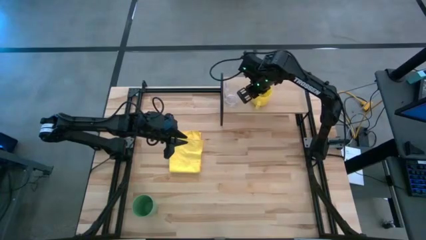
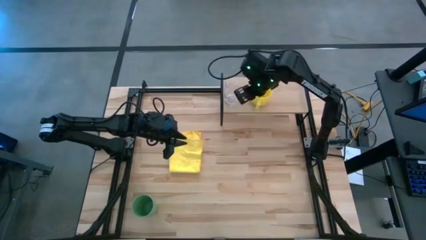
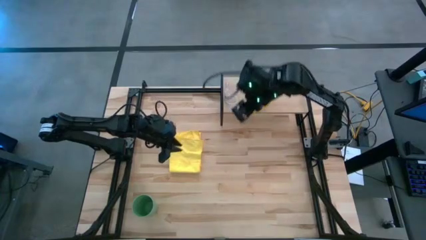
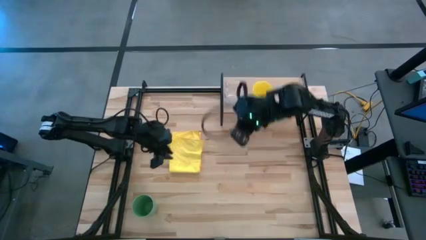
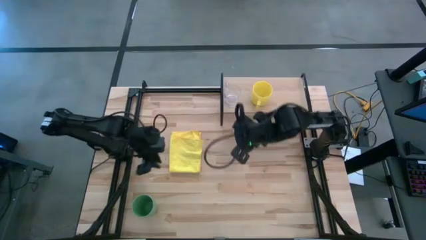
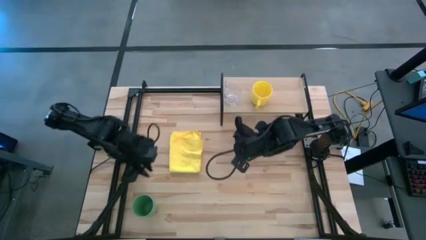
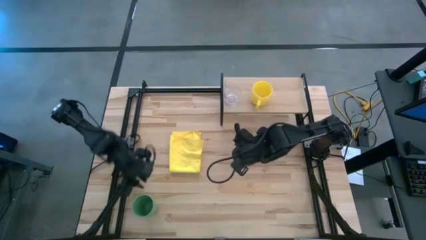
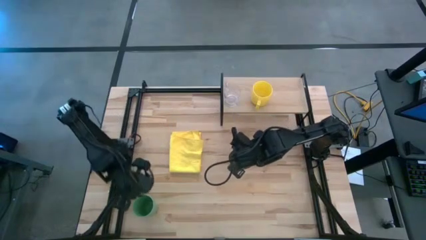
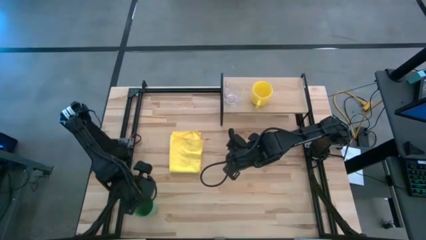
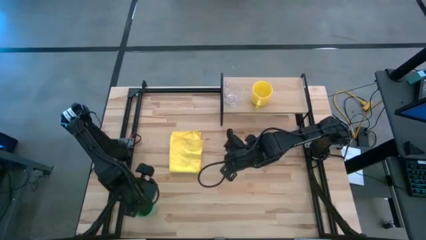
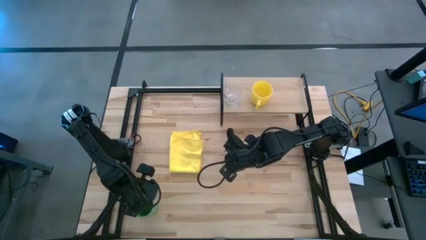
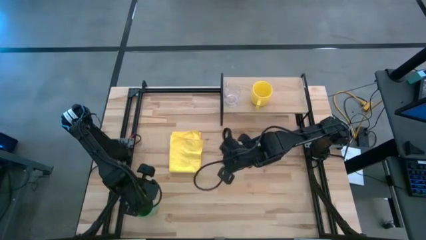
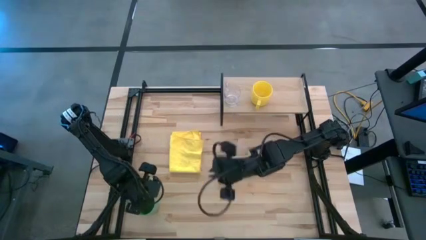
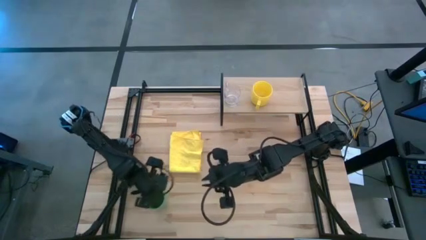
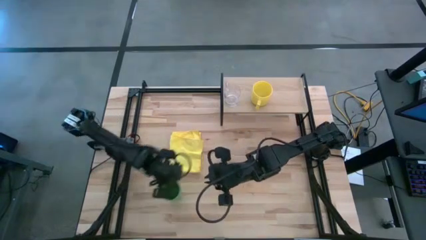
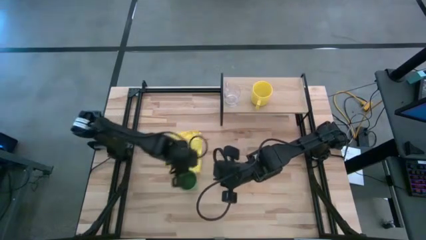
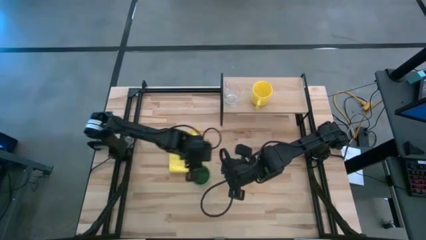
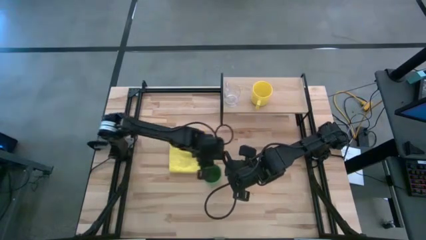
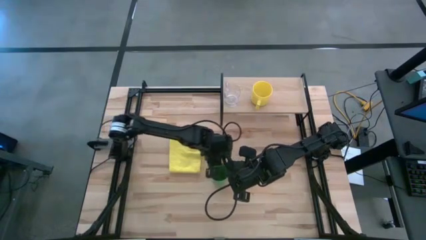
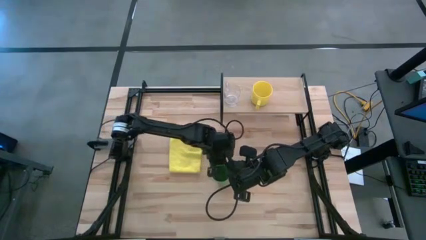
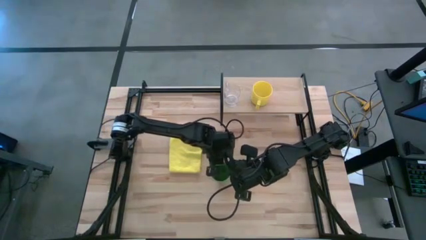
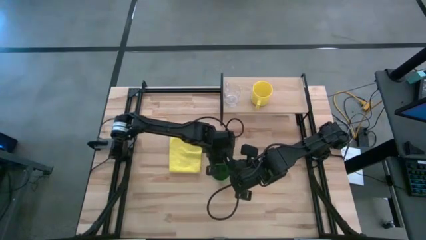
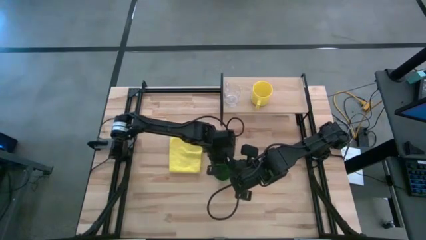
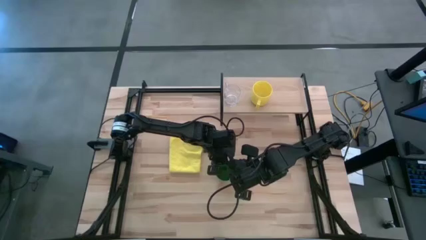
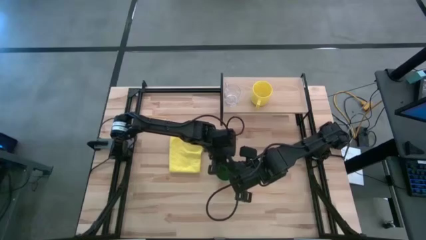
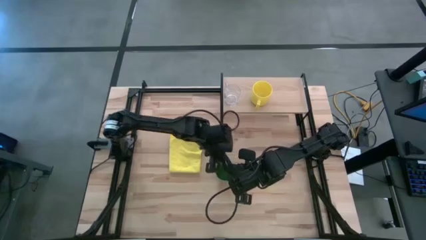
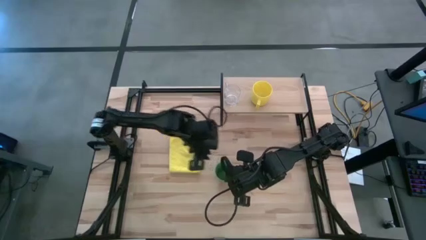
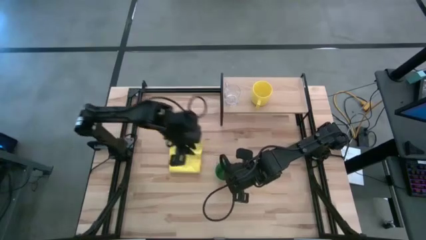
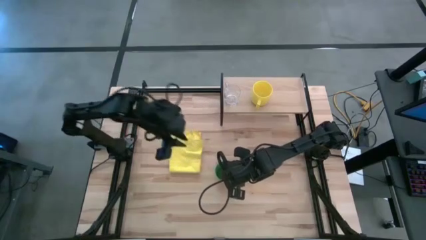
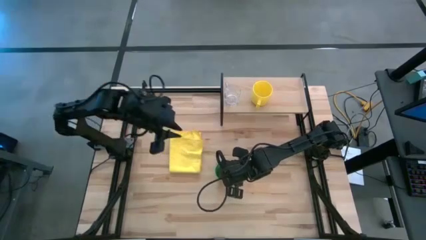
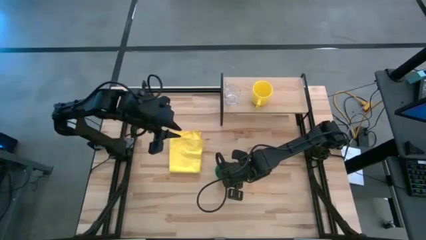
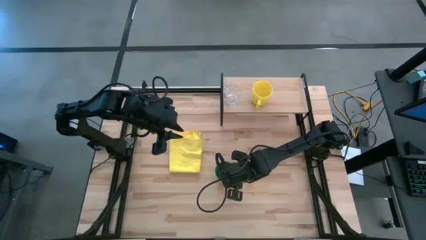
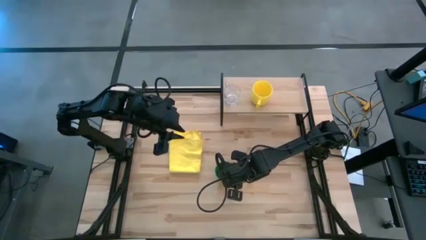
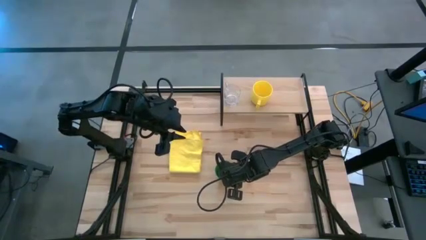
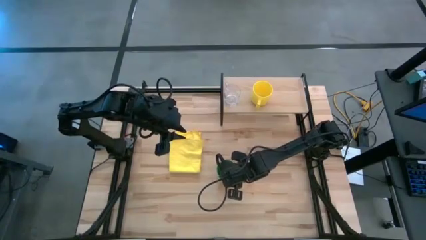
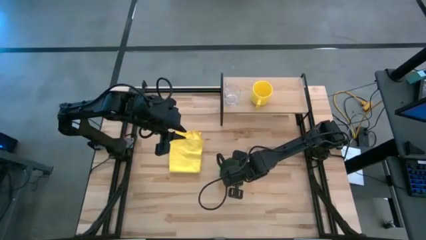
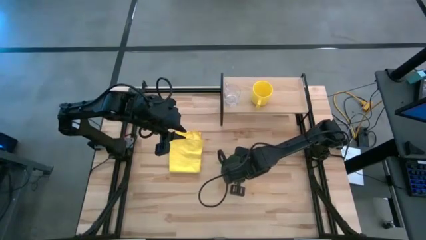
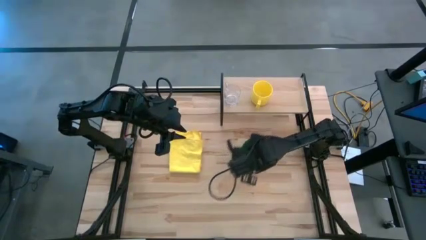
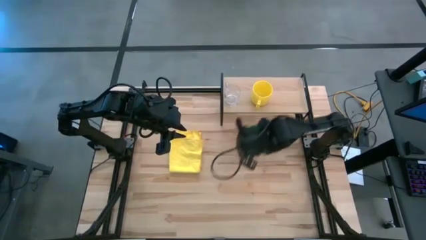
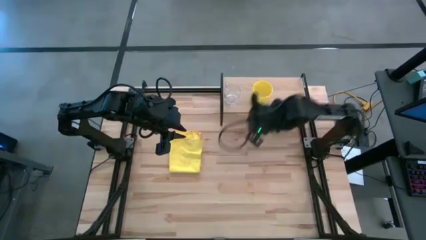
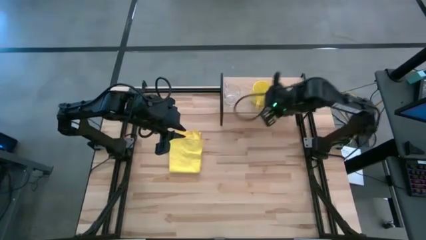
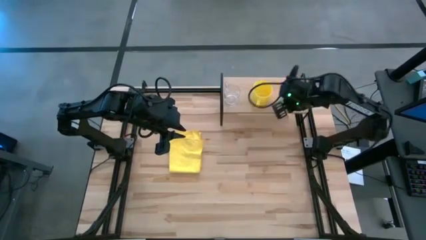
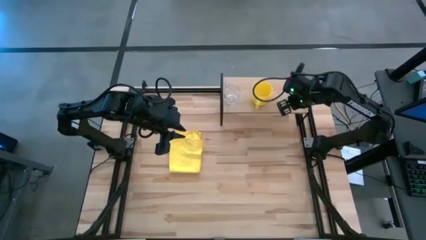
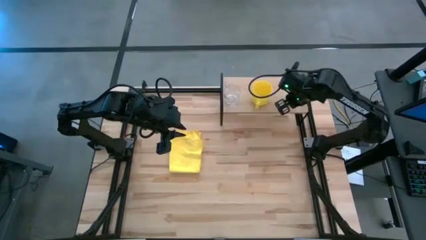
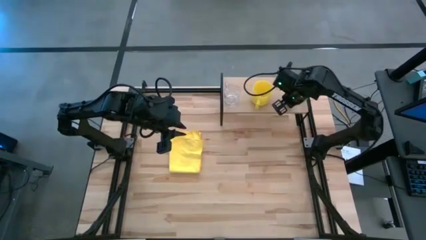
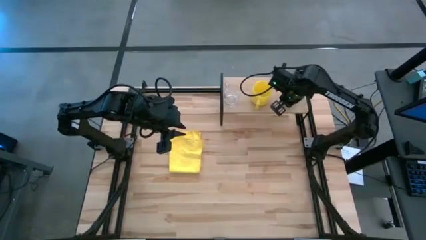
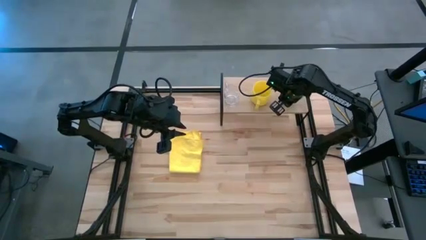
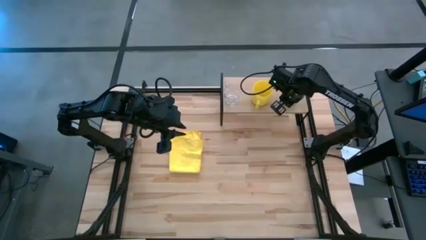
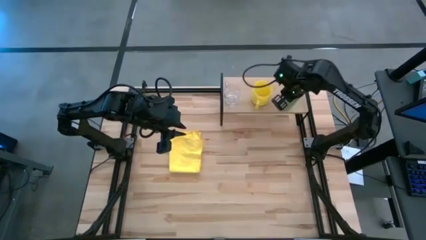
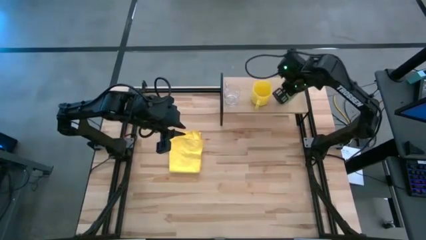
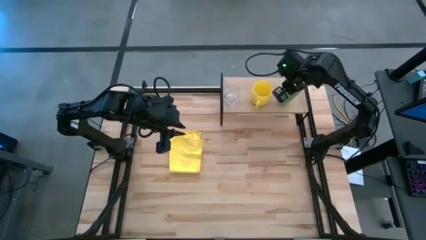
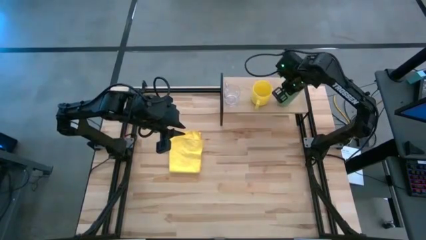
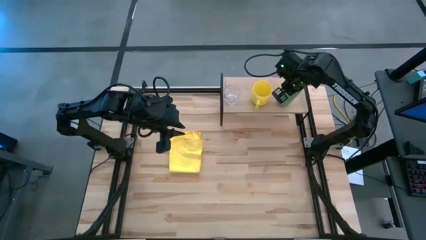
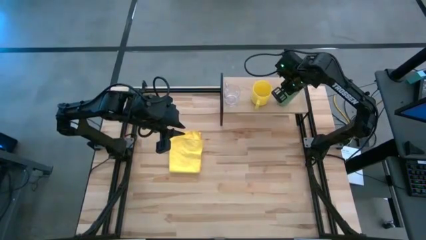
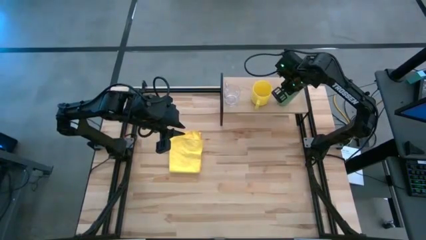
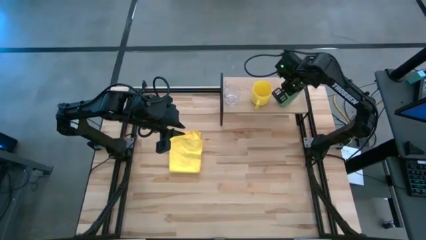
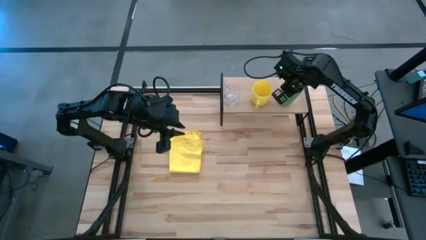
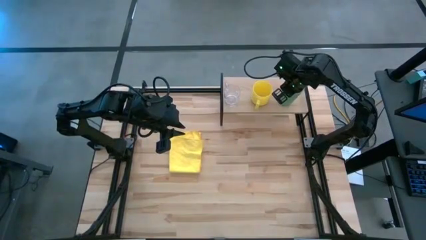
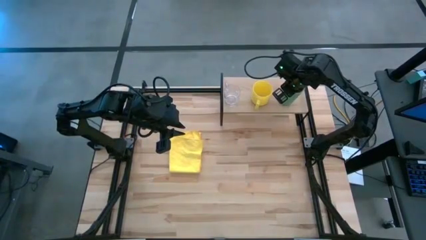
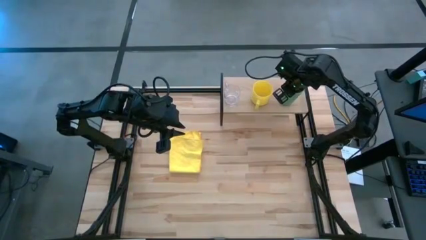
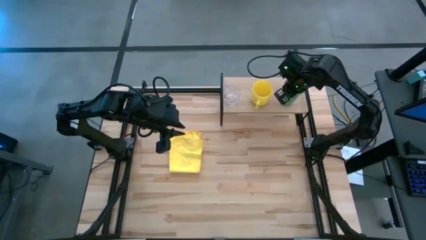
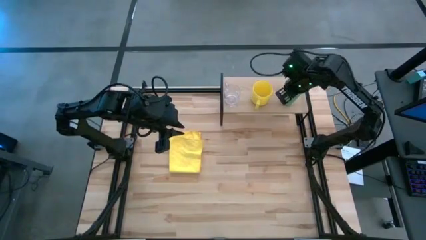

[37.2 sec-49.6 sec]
Task: Stack small to large cups/mugs on shelf
Put the green cup on the shelf

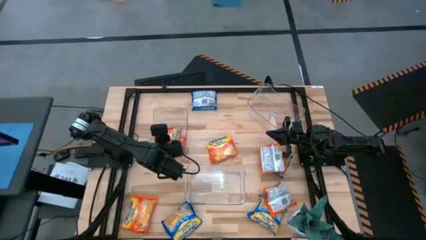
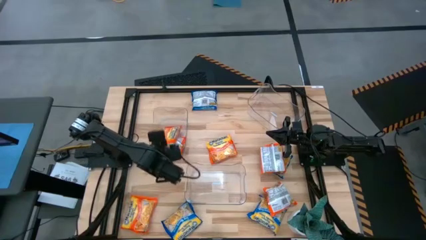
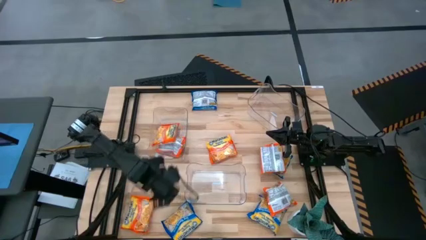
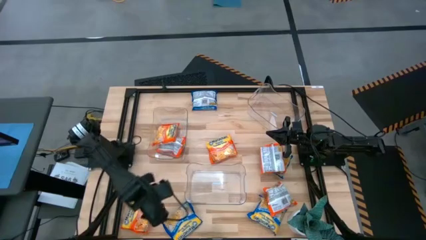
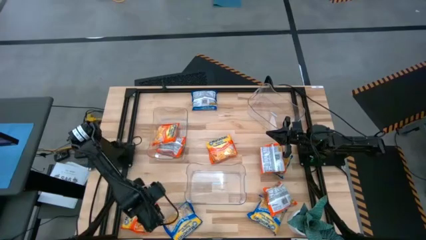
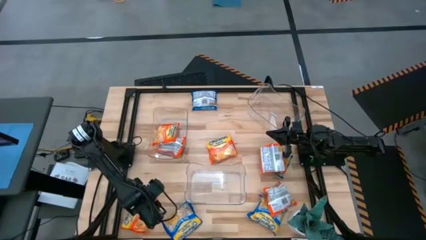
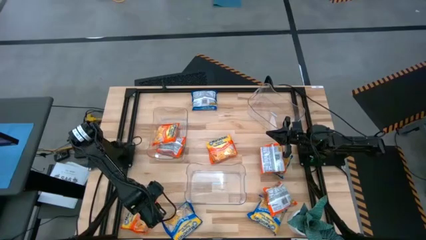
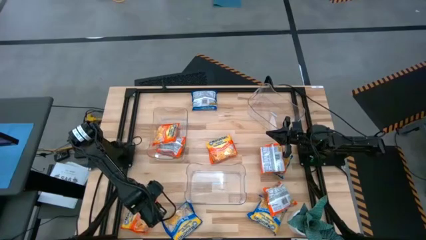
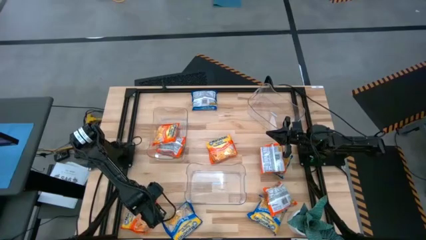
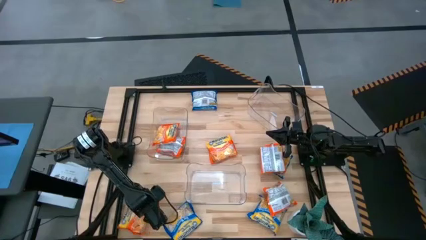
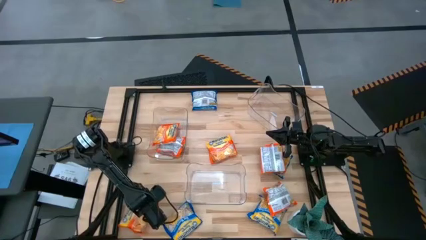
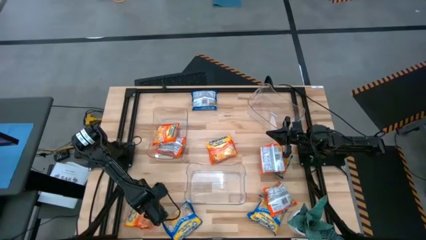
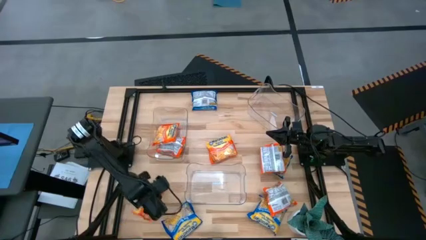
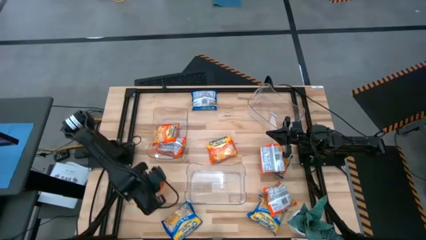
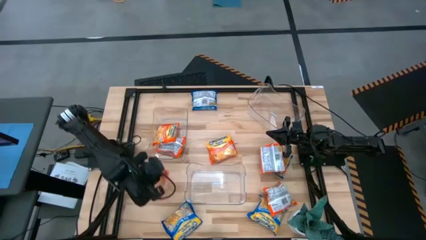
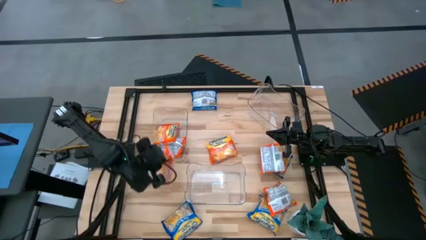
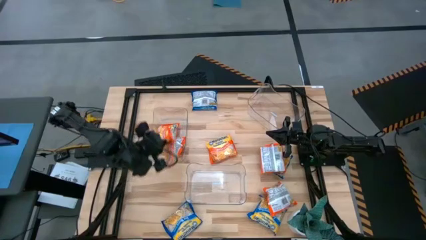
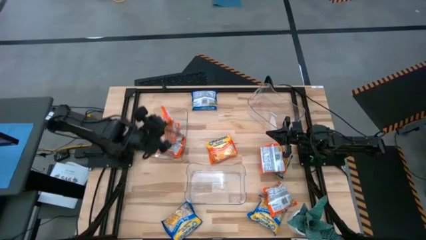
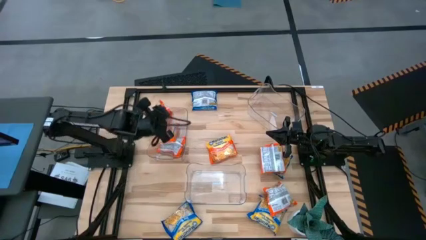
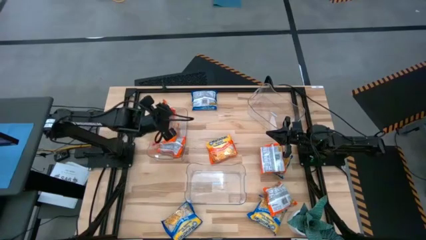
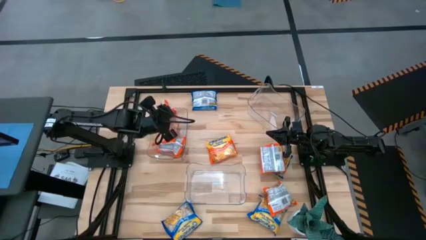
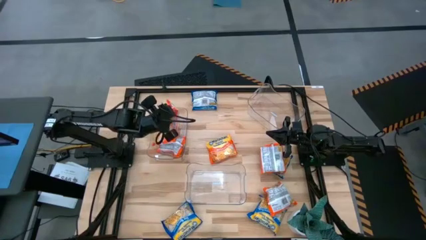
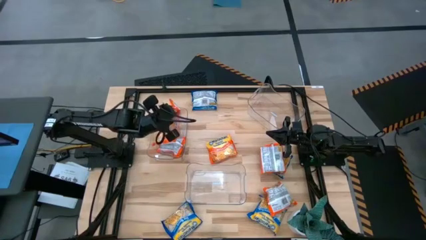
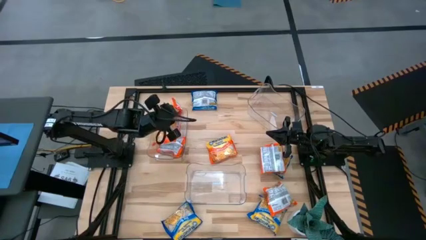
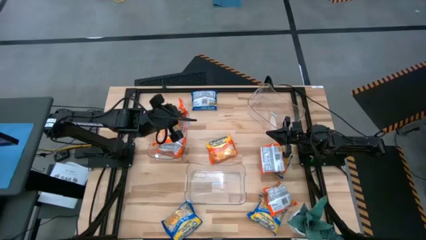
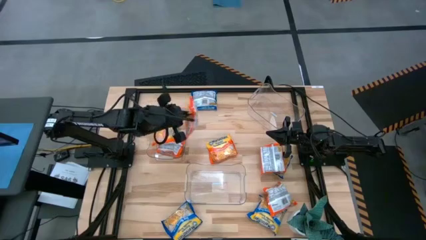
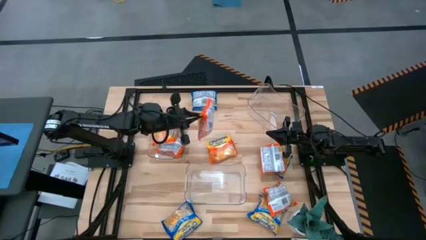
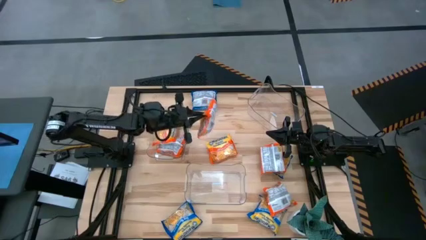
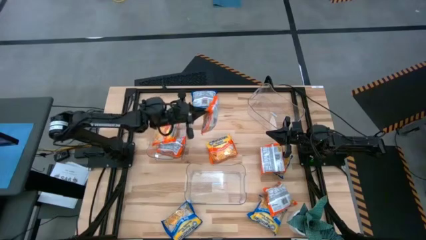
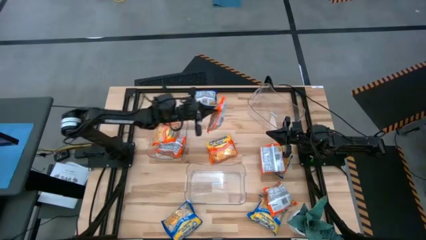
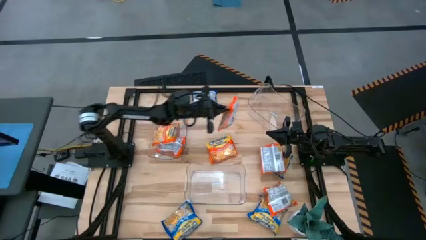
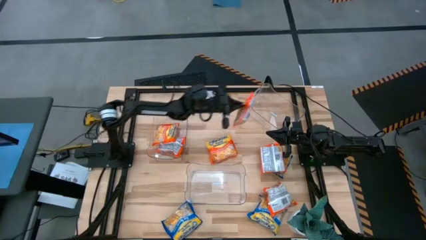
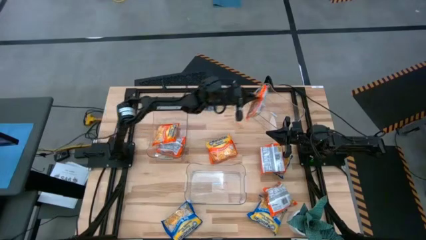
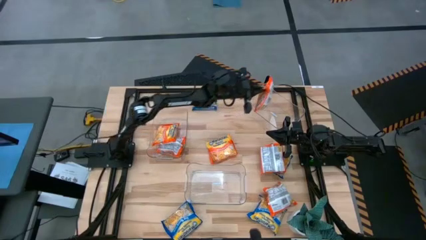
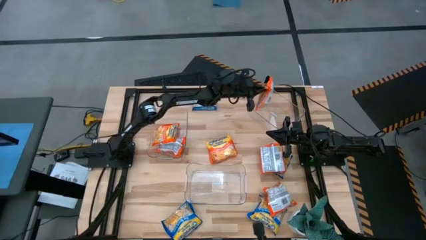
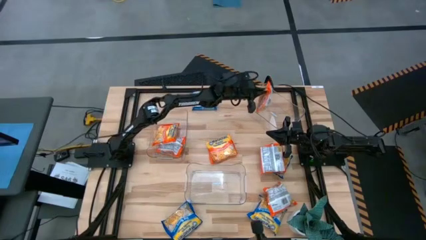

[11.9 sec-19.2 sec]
Task: Sort Maruchan noodles
Put the orange noodle pack into the top transparent bin
